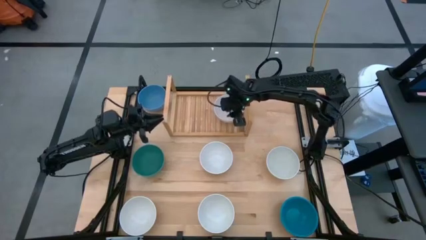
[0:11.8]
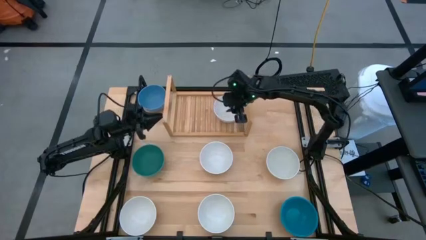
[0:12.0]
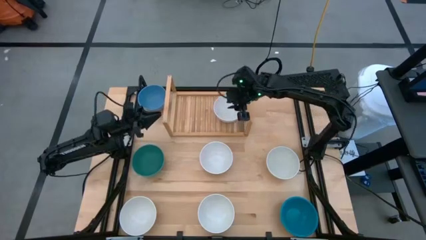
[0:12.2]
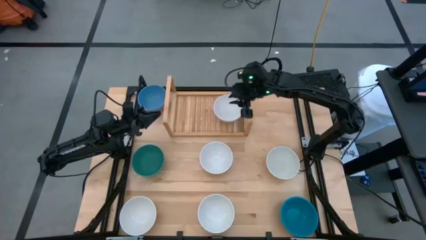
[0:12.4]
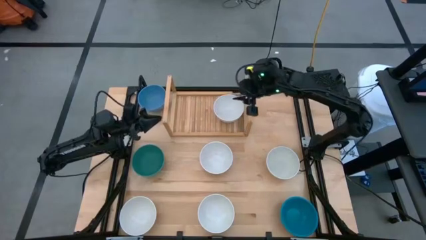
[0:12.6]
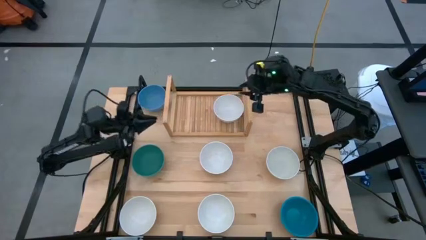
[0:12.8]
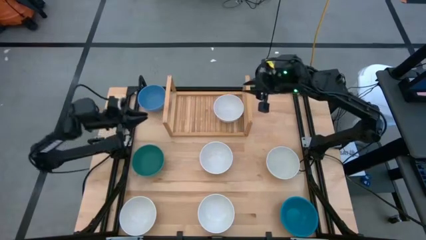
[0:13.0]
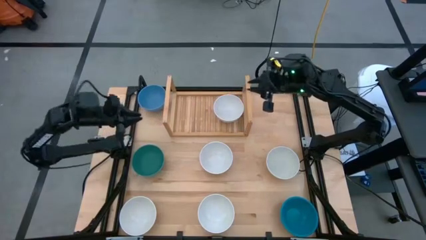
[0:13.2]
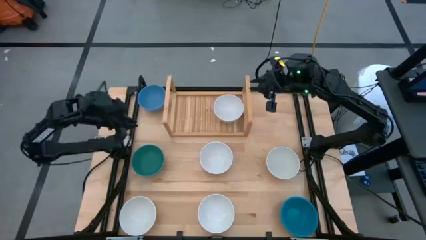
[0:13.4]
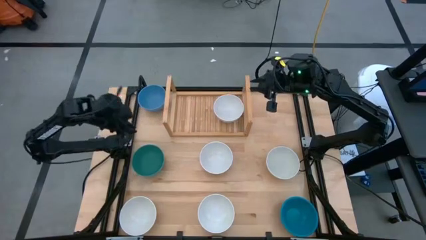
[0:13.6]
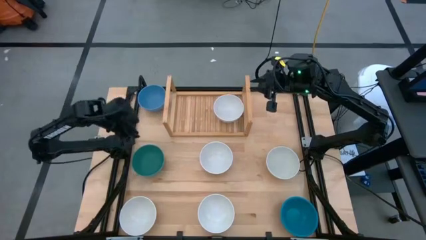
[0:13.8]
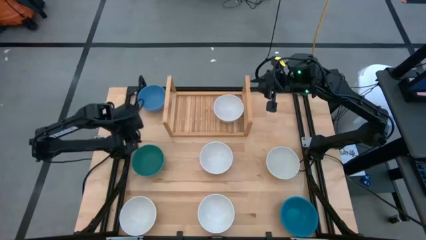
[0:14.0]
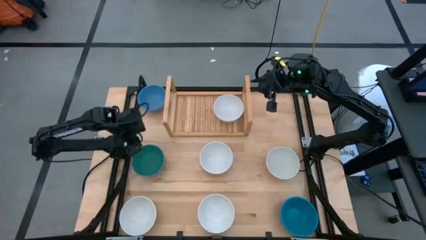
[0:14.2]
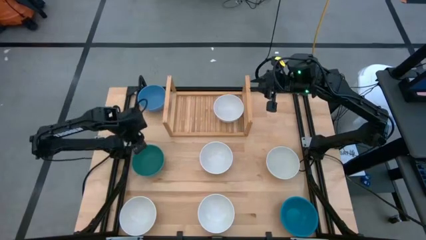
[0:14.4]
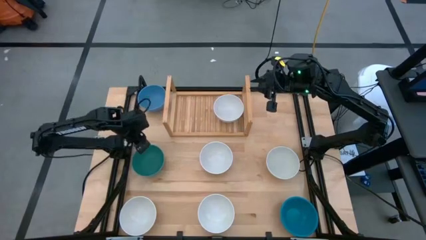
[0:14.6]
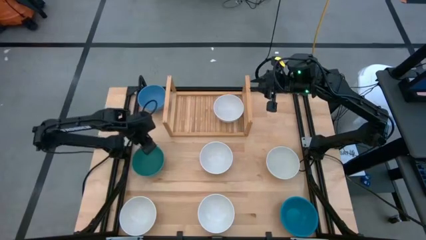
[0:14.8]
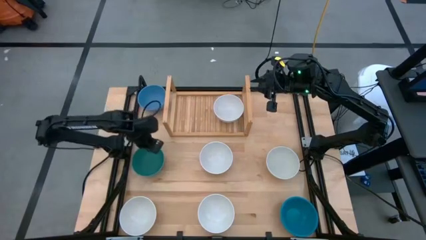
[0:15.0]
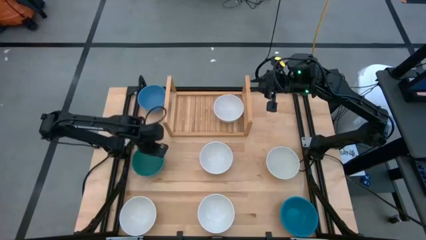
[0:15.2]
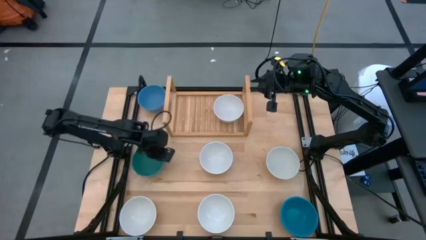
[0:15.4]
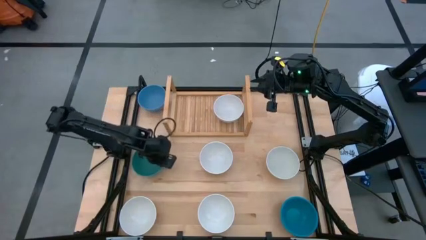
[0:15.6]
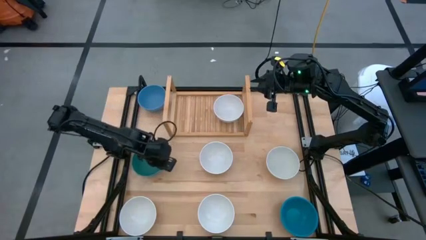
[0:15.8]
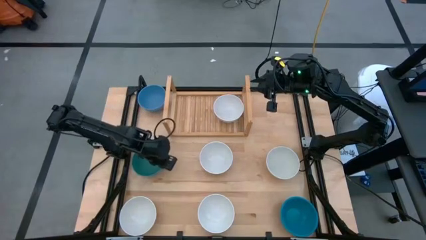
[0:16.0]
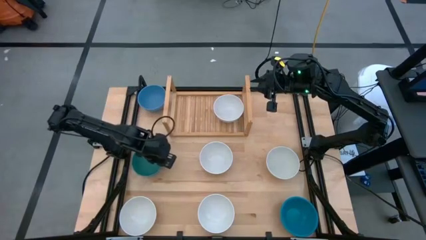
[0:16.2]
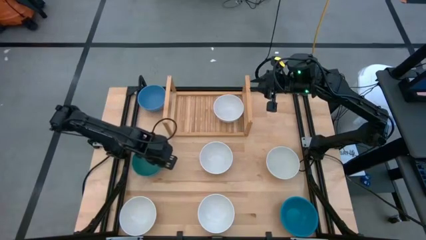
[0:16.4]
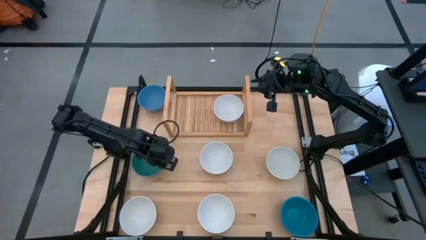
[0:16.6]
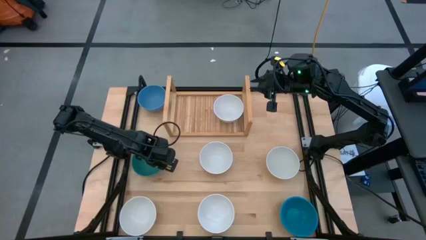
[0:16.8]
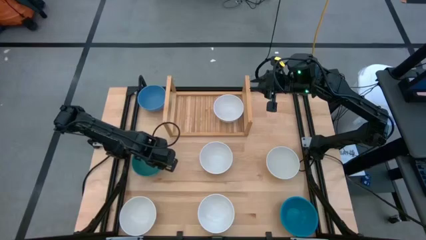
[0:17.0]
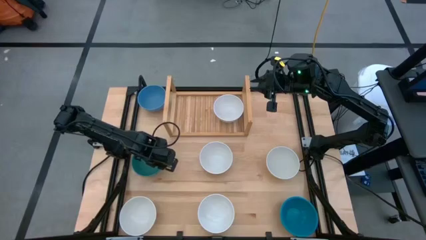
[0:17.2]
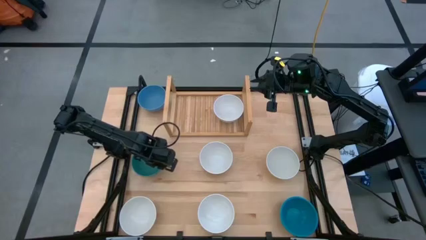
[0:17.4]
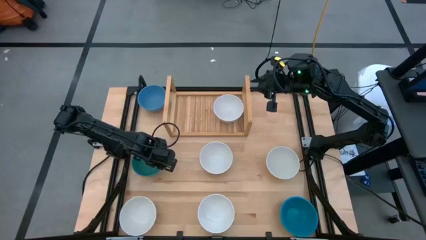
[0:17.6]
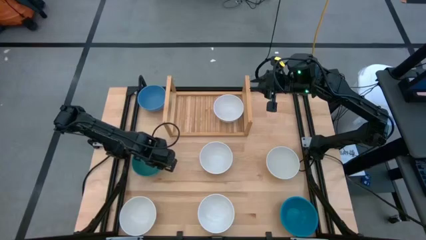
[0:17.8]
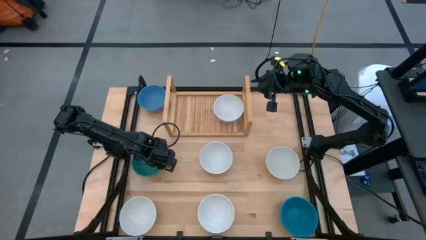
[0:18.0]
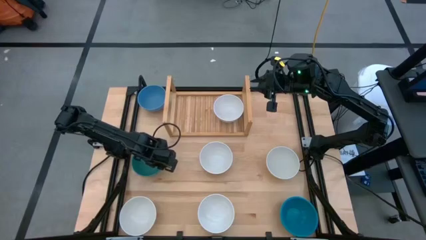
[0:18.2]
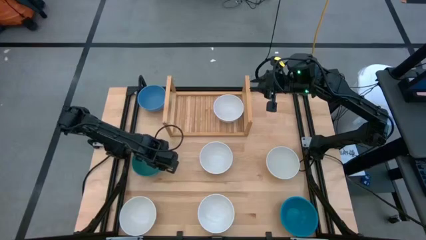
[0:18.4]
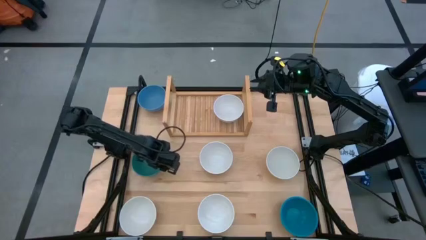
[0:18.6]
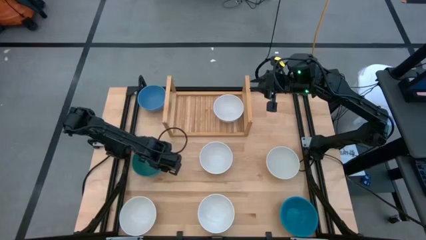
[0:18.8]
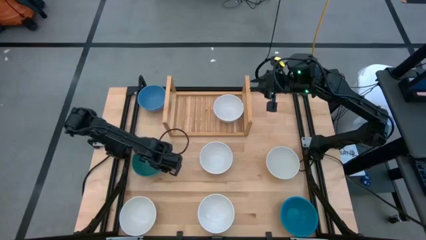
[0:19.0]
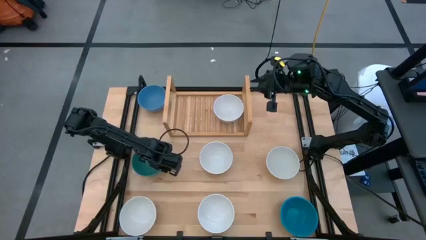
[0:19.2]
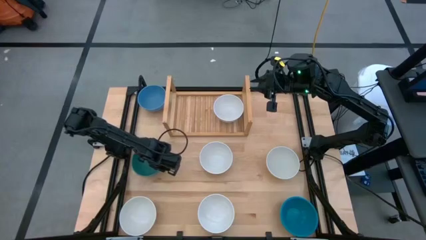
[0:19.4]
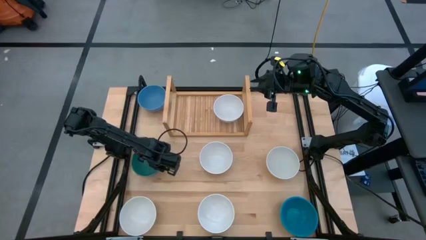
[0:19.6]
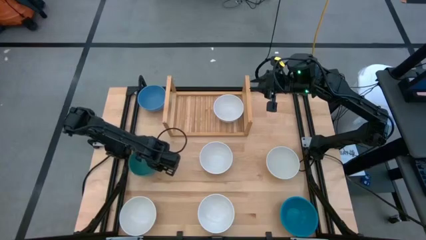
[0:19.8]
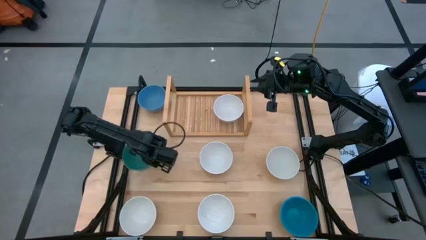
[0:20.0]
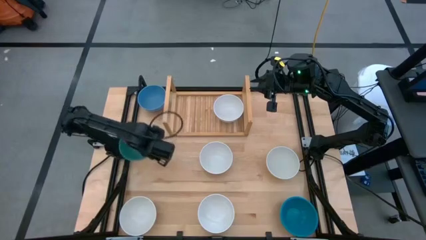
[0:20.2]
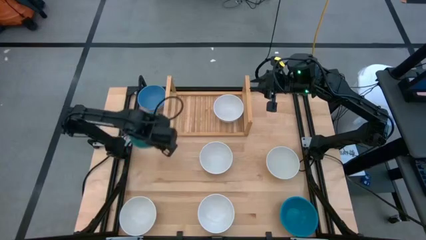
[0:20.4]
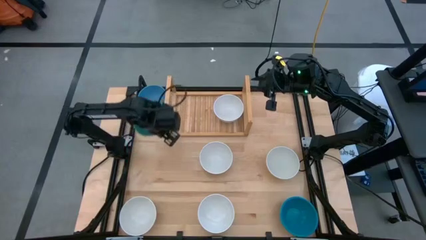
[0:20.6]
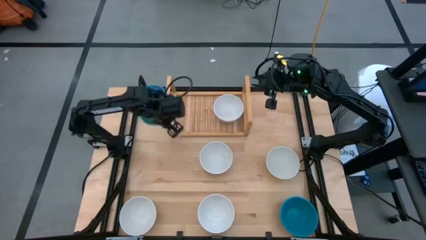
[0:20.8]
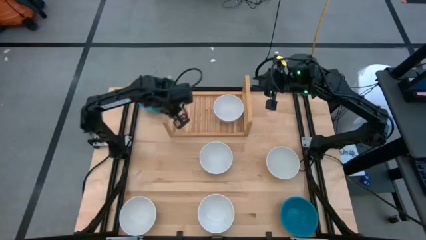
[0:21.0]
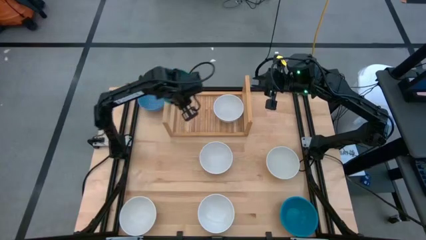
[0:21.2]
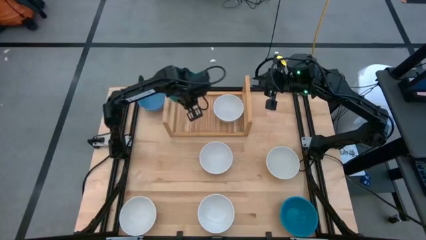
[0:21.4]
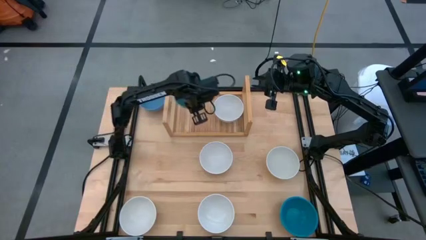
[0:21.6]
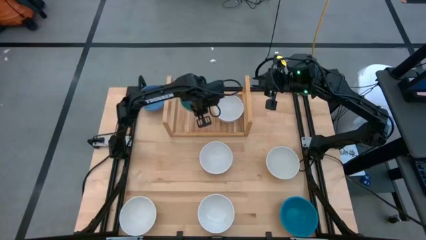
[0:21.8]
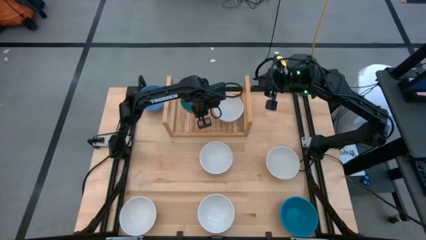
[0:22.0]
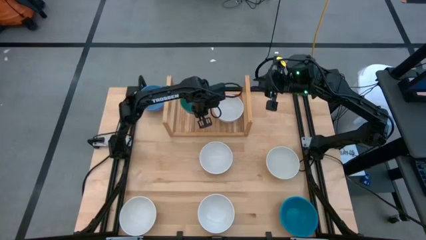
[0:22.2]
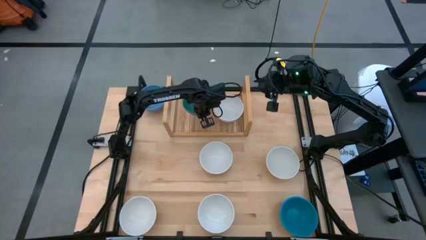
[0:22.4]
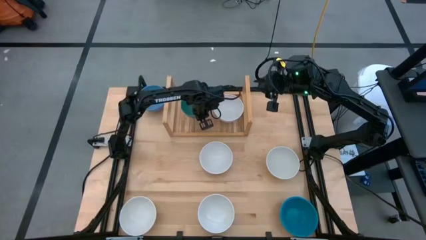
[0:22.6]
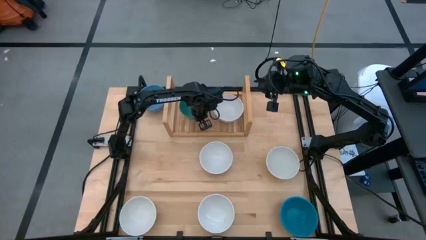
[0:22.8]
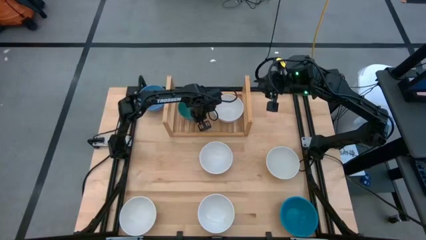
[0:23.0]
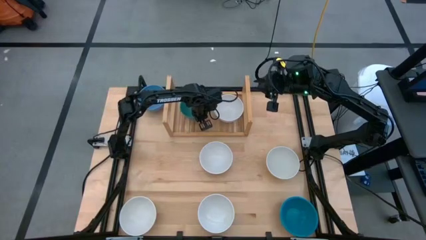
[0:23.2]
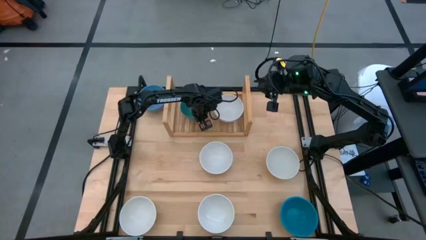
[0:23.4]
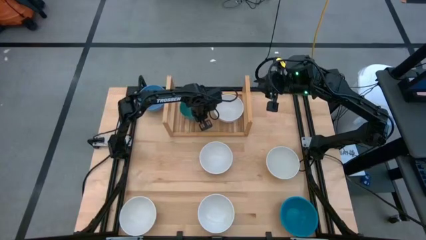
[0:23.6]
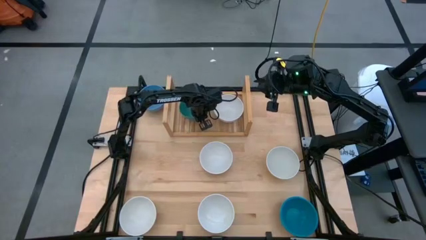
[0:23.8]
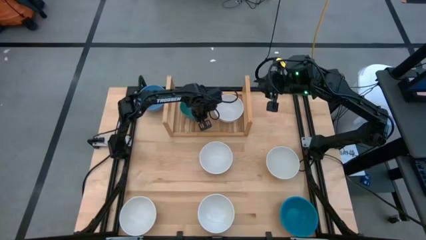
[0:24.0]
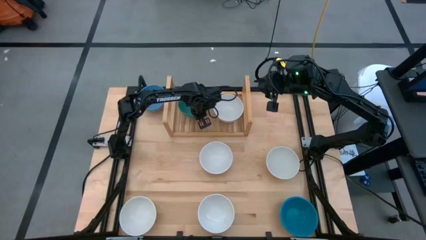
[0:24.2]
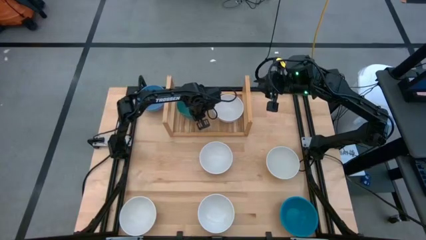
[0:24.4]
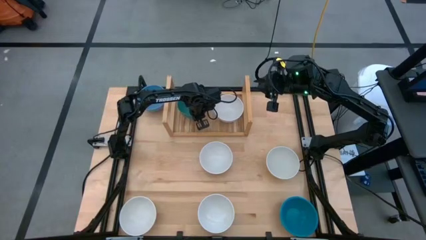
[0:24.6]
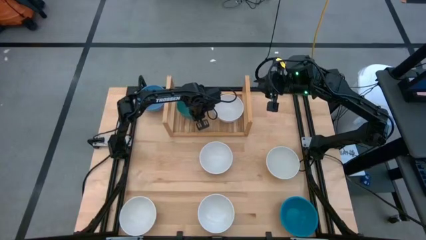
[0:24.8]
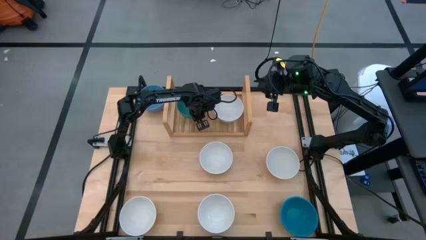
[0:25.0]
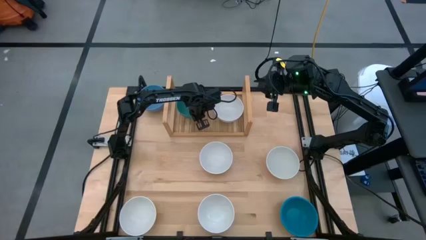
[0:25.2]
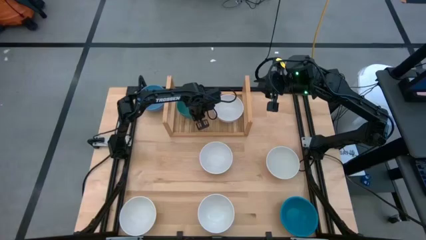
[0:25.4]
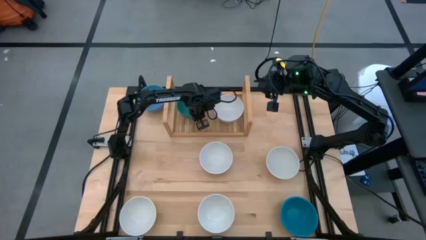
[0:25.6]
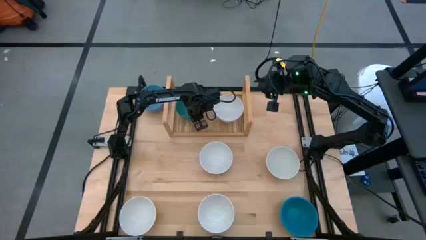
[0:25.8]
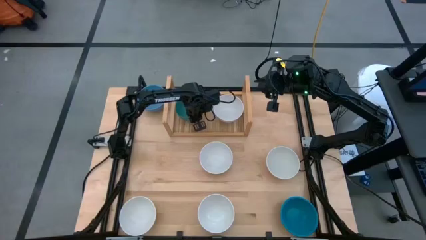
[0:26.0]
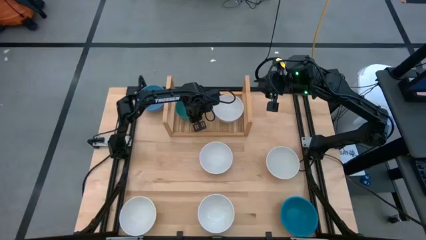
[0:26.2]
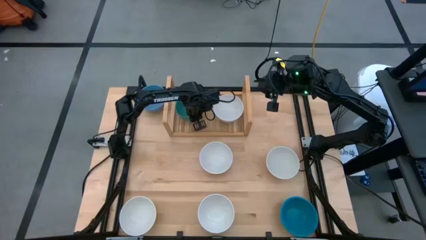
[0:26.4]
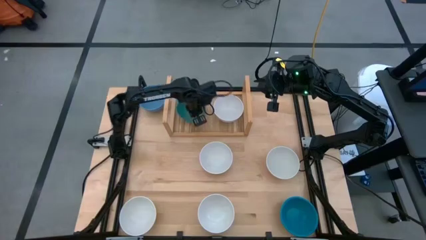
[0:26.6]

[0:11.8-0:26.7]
Task: Place and stack bowls onto a shelf
Put the green bowl on the shelf

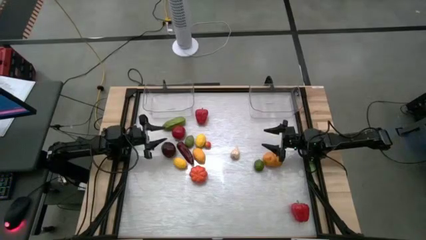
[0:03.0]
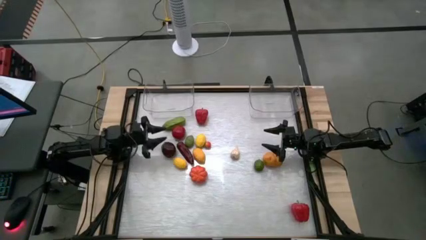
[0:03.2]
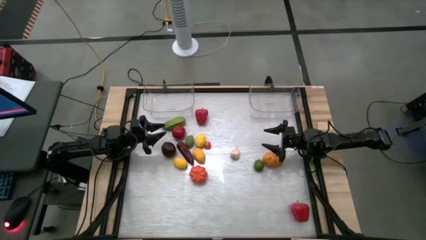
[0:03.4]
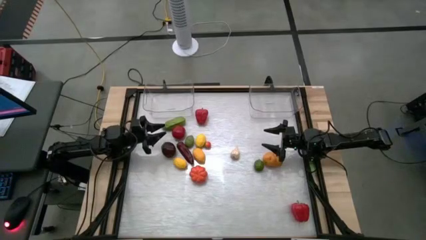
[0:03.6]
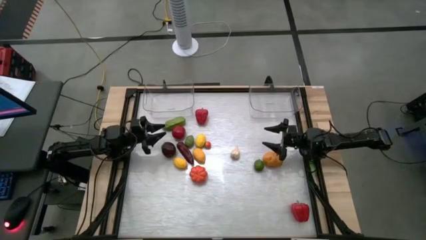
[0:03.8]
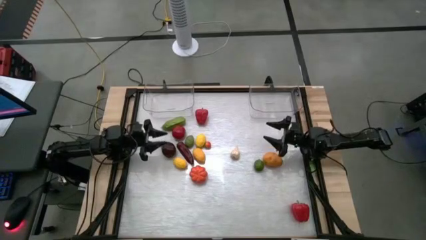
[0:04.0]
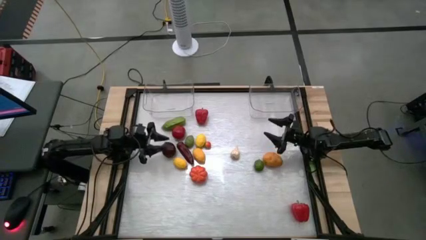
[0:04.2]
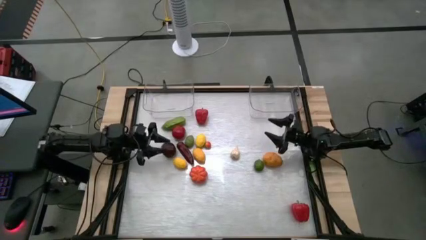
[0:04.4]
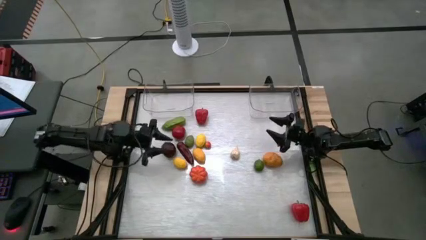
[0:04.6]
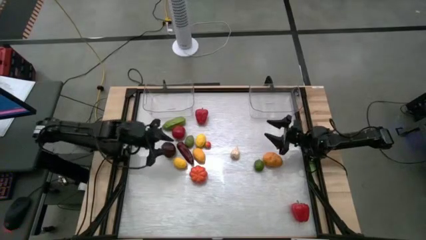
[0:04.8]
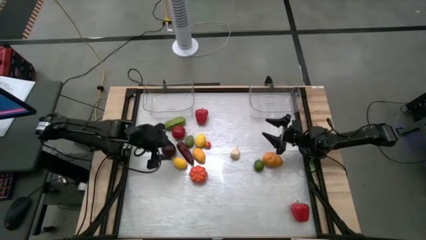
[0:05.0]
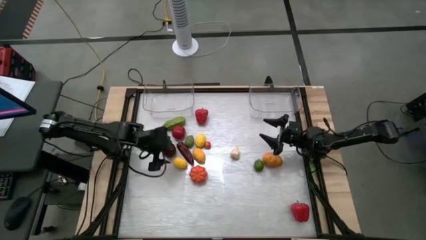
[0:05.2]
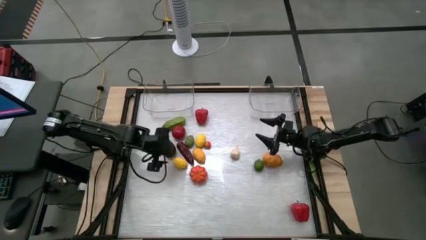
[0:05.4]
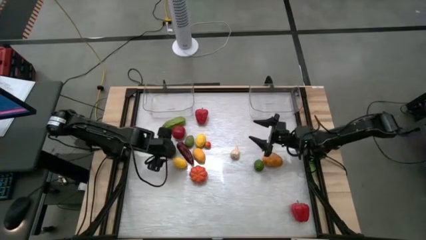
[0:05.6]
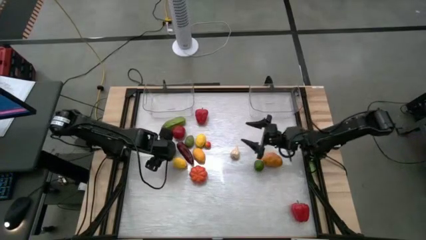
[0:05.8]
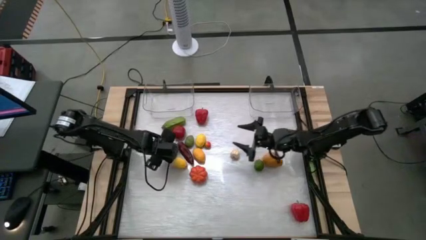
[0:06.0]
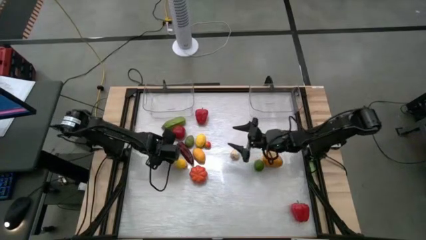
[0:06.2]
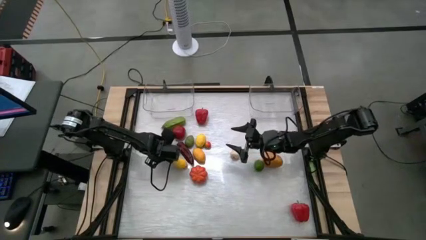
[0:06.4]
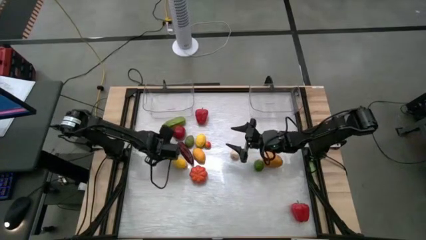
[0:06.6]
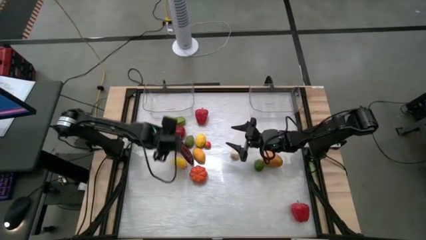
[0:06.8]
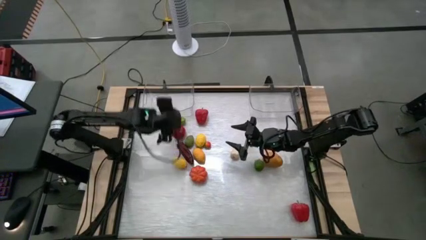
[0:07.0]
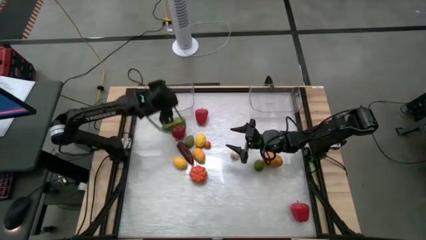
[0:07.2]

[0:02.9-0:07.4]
Task: Sort produce into baskets
Put the dark red apple into the left transparent bin
